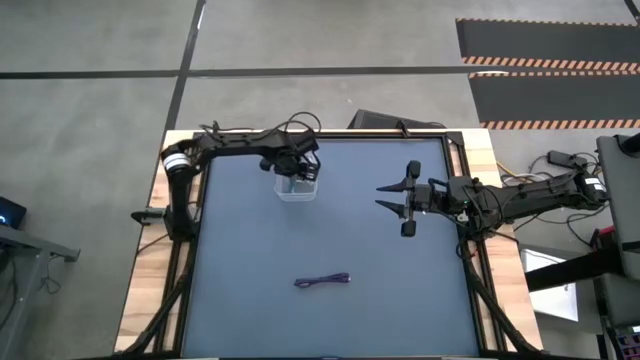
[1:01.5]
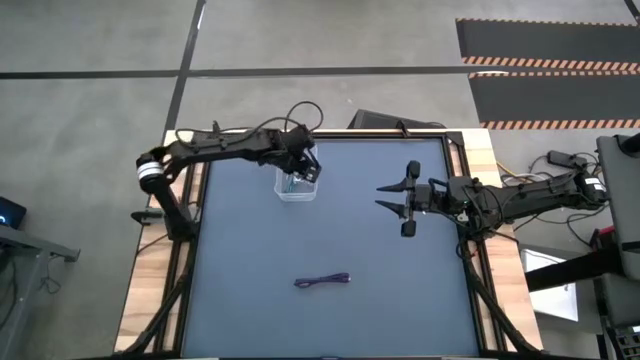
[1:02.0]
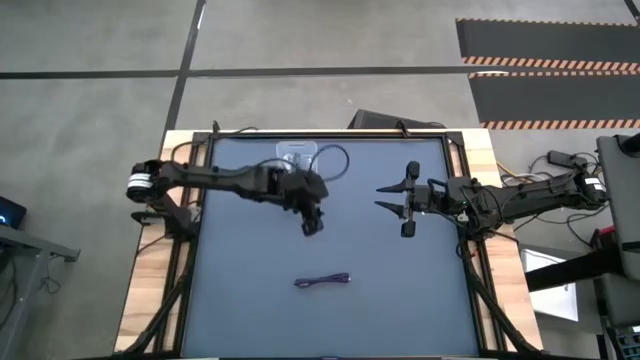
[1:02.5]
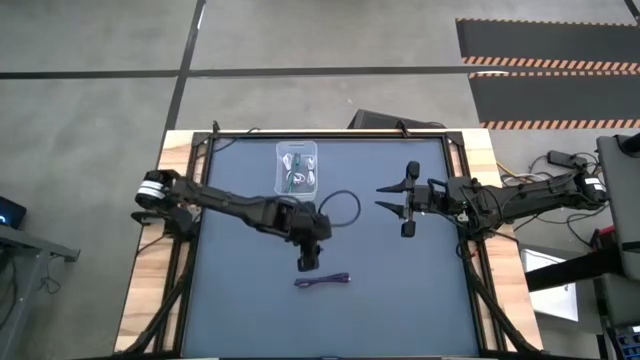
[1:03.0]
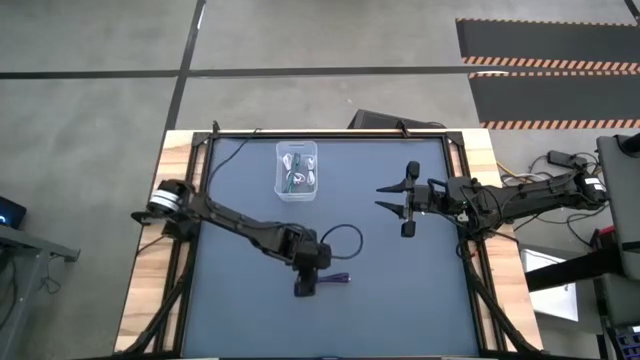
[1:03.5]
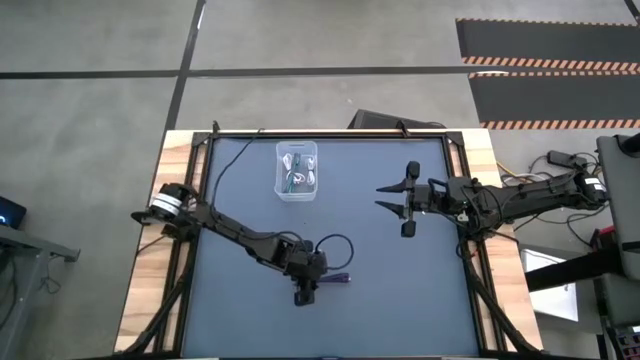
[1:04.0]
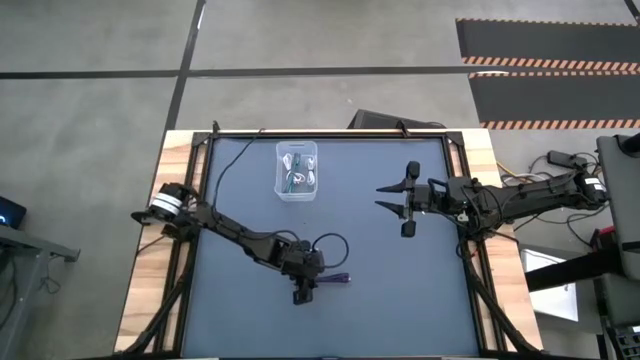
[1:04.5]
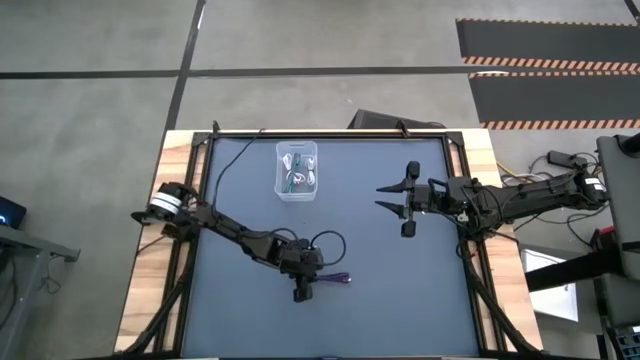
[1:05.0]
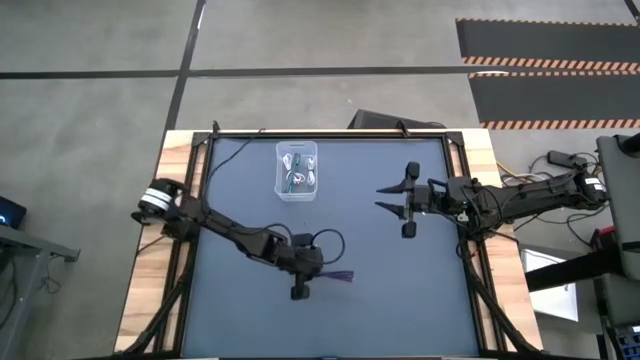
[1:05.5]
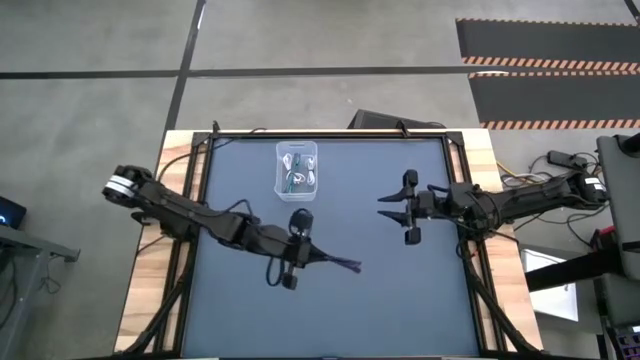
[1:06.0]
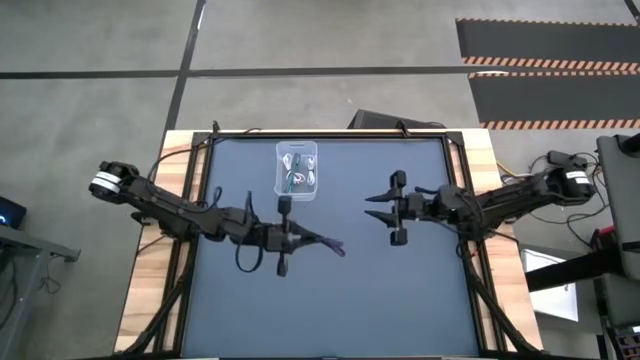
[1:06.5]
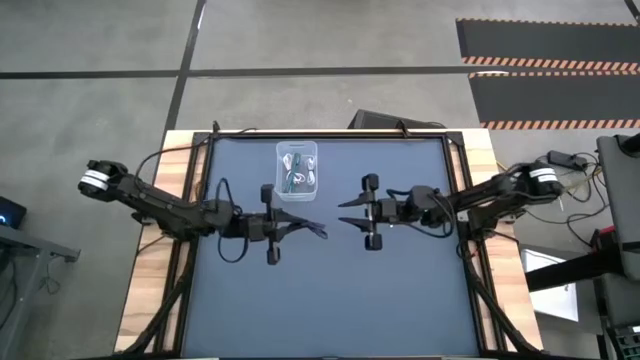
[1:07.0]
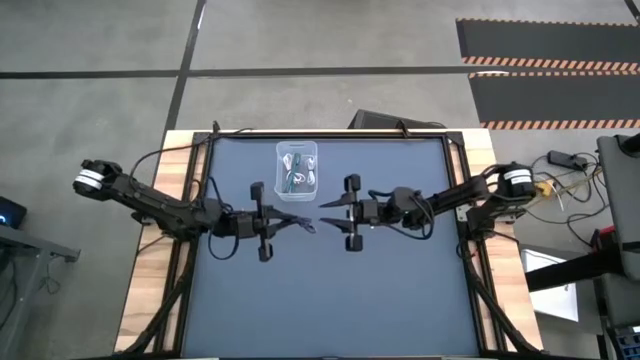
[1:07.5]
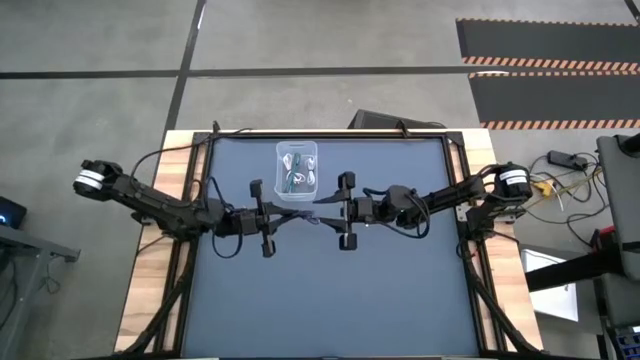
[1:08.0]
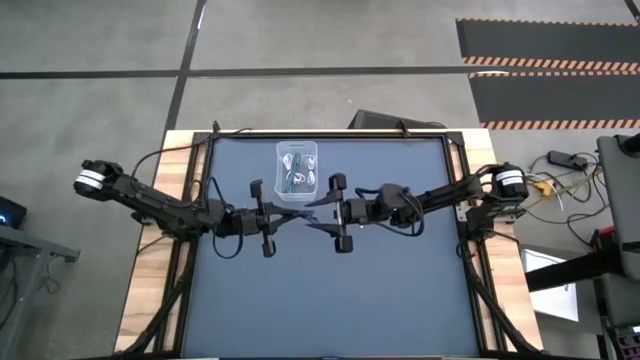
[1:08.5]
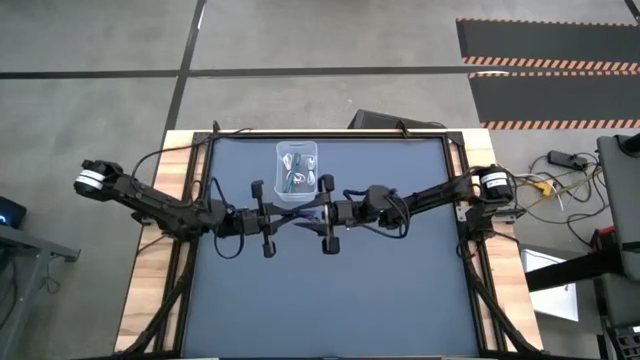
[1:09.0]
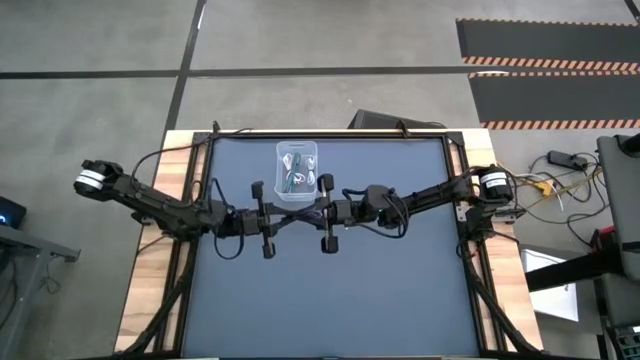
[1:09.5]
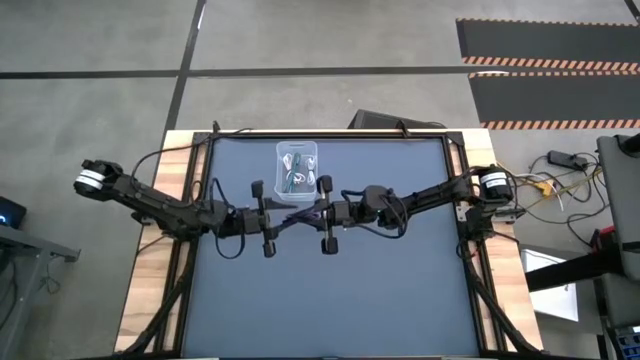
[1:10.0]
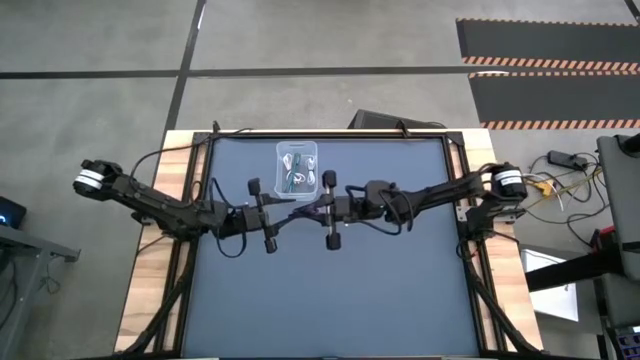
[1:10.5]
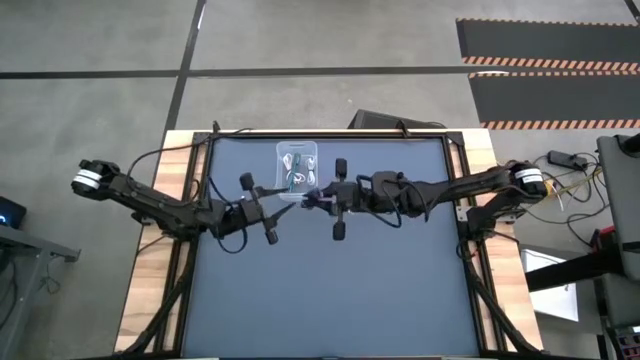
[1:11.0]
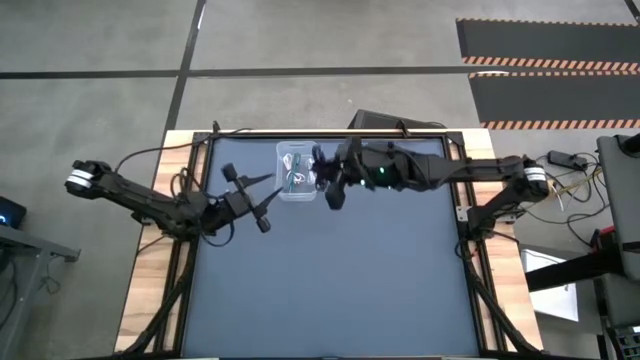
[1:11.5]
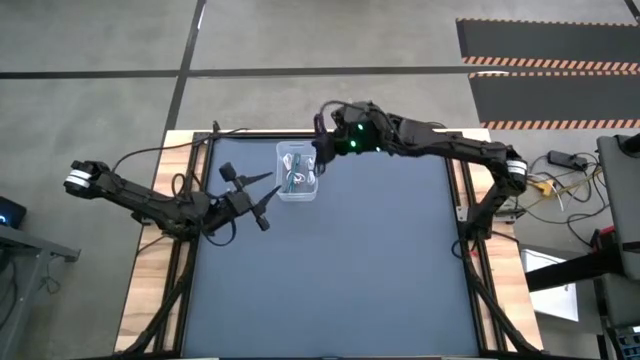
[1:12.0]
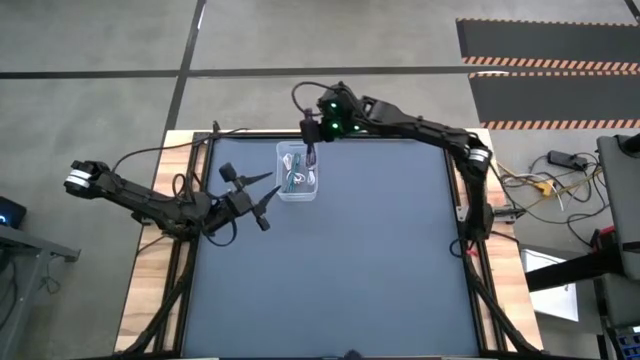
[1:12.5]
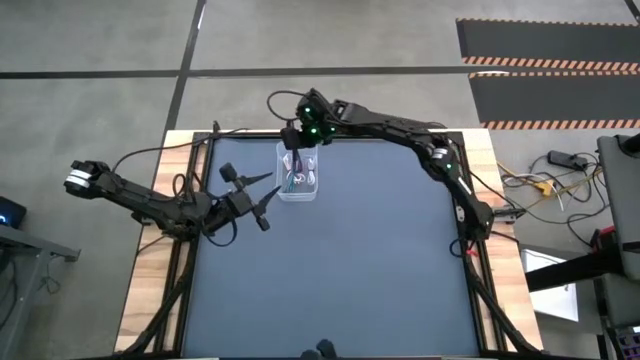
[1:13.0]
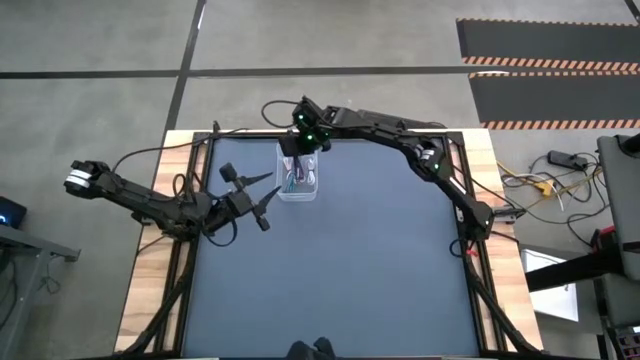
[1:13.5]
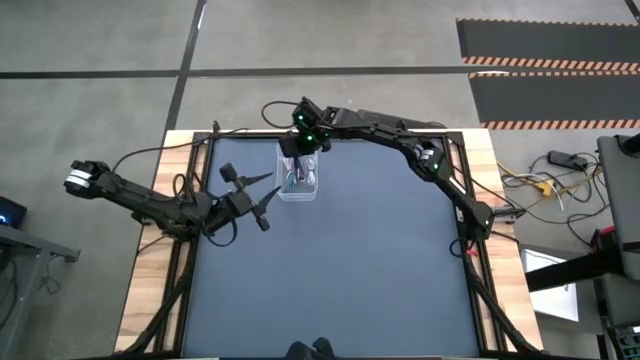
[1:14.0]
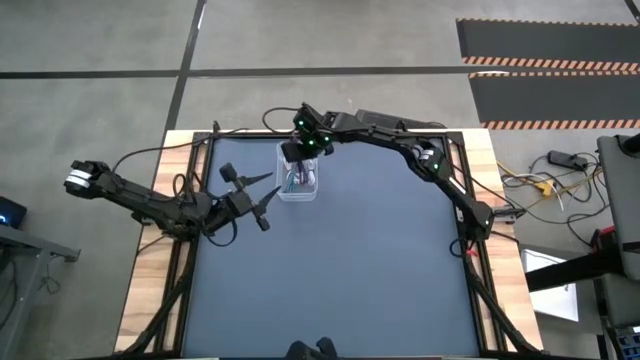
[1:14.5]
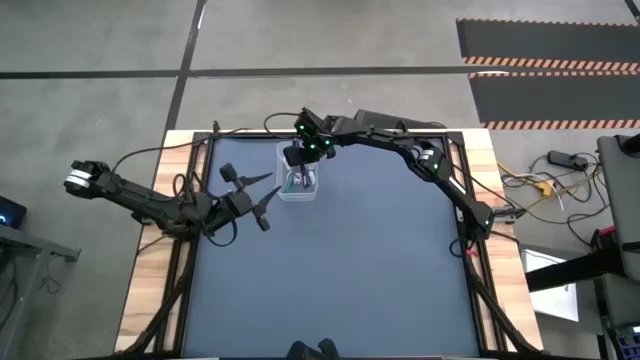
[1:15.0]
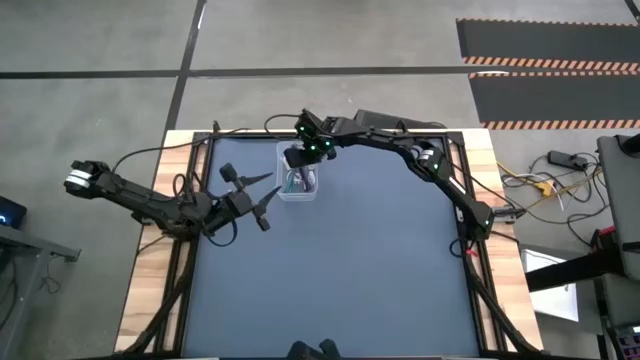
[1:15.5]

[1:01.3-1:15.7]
Task: Pick and place USB-C Cables
Put the purple charger cable into the transparent bin

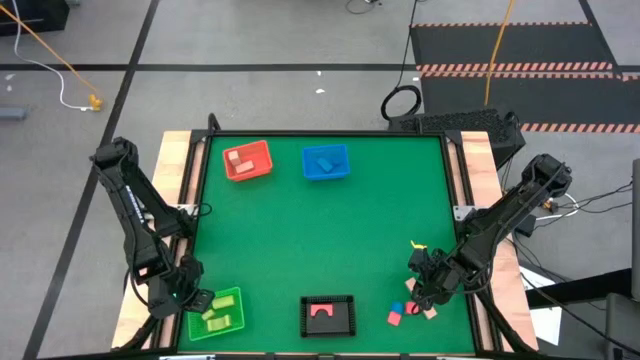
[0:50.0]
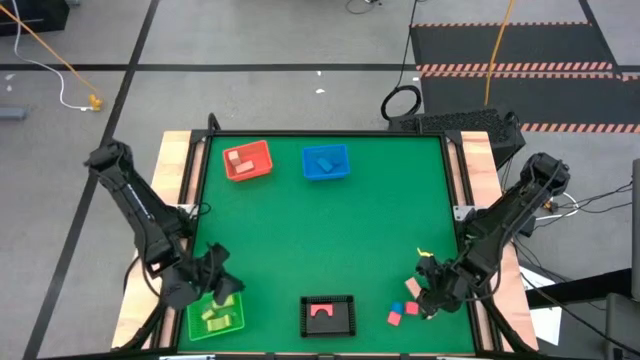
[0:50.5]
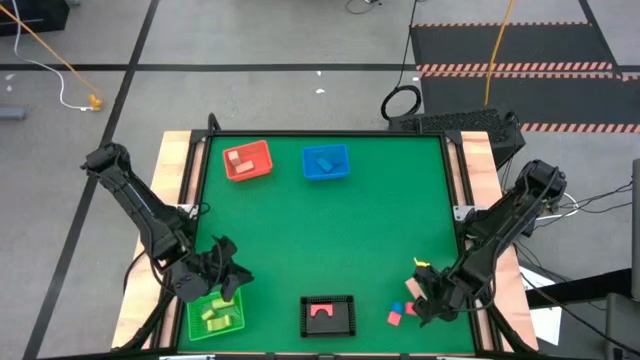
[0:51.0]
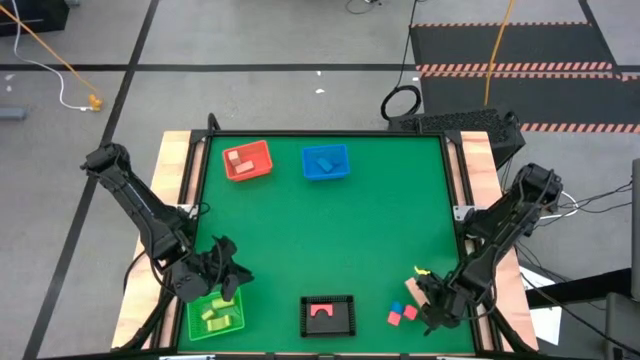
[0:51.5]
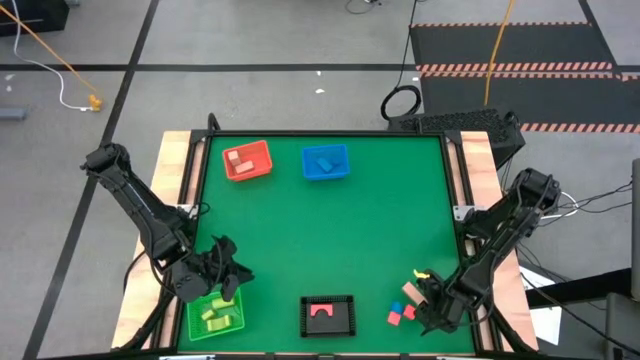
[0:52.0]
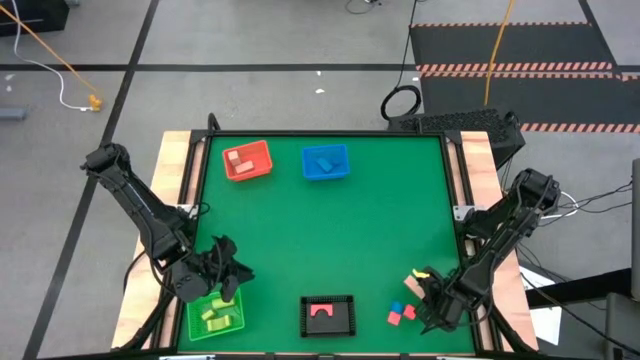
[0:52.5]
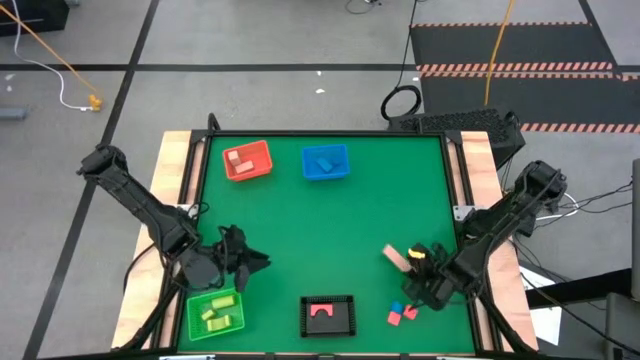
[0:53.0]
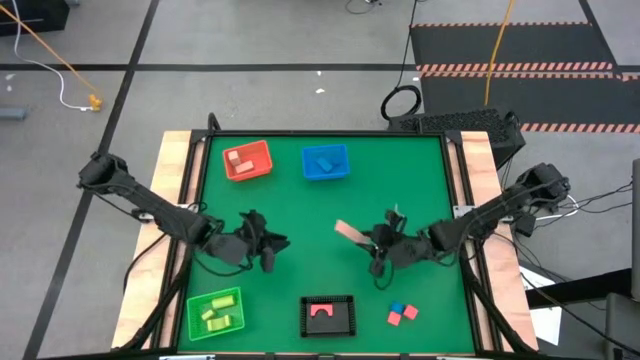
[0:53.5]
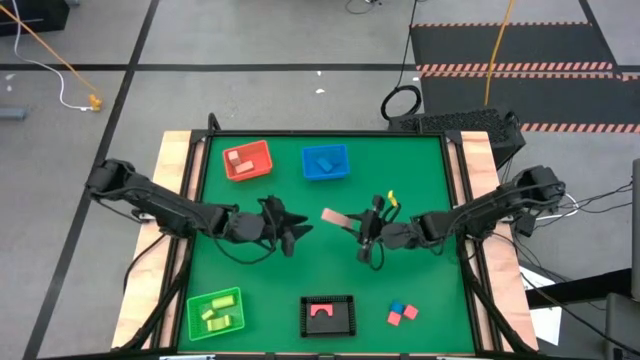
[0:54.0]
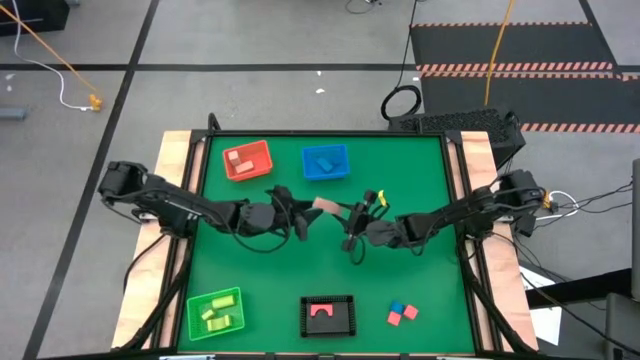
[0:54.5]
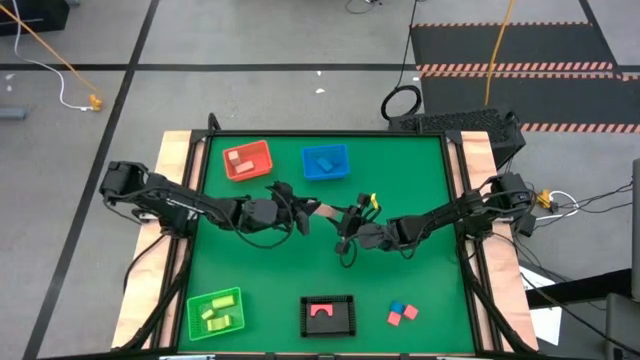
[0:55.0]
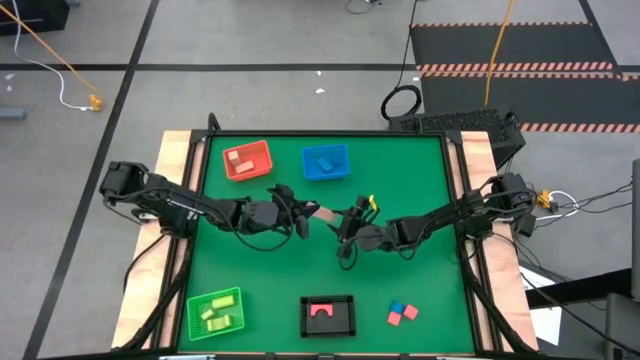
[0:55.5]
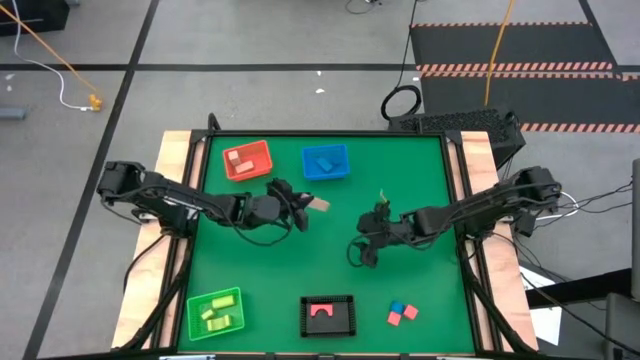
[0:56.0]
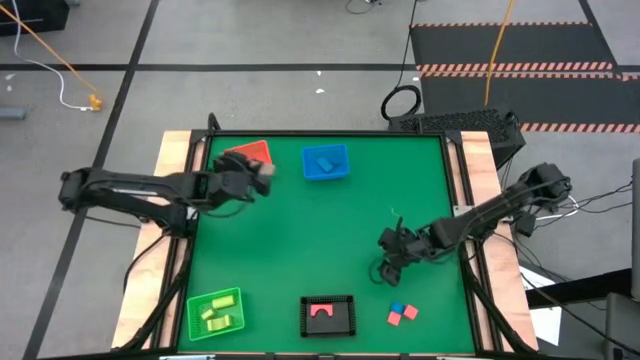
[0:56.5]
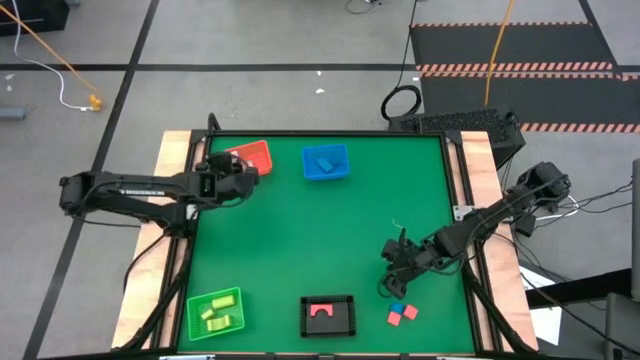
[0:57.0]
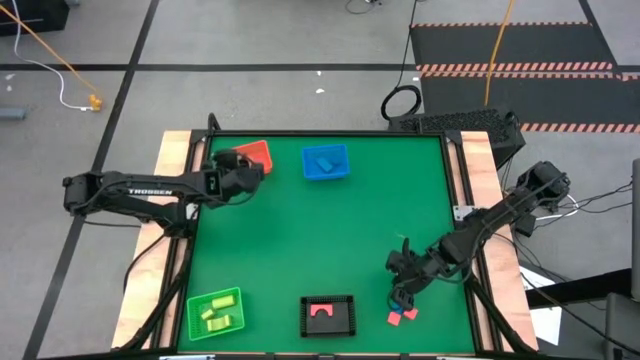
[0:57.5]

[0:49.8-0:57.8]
Task: Sort & place blocks by color
Put the light brown block into the orange bin
